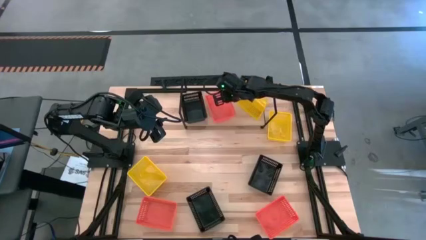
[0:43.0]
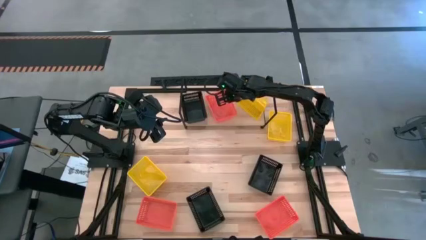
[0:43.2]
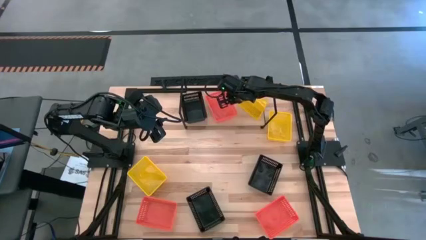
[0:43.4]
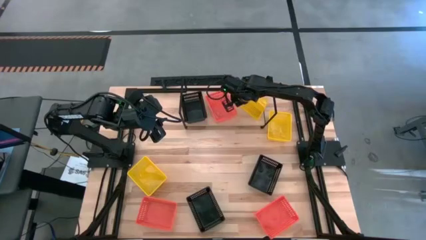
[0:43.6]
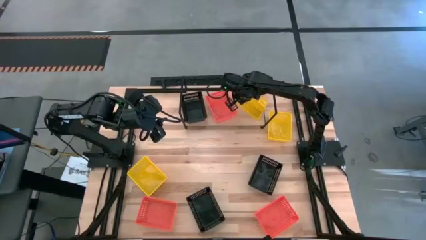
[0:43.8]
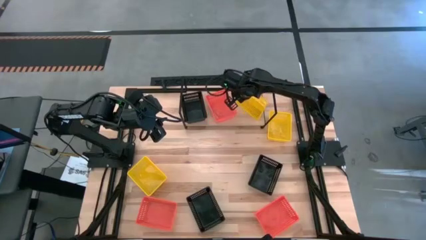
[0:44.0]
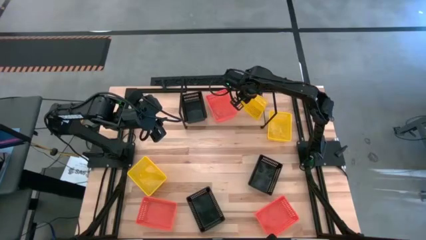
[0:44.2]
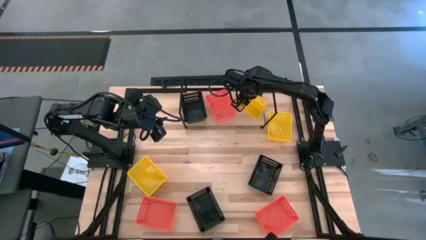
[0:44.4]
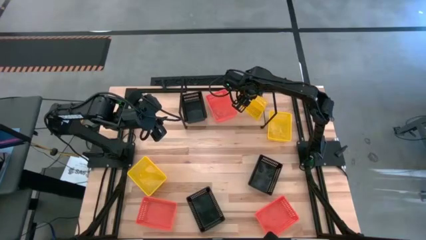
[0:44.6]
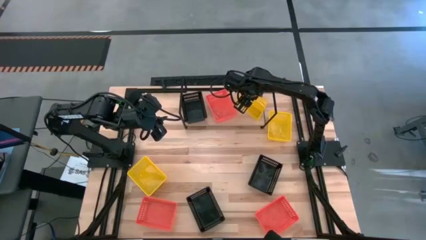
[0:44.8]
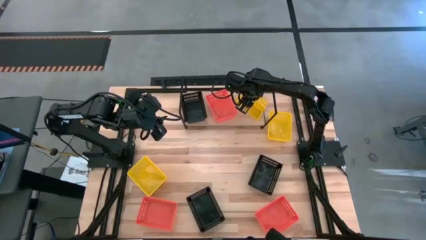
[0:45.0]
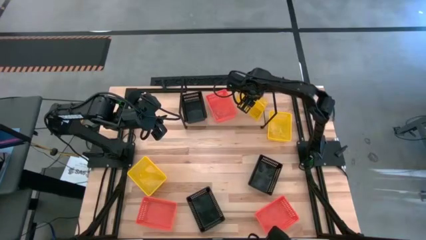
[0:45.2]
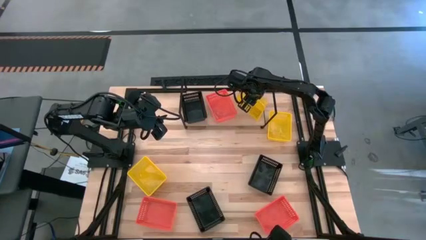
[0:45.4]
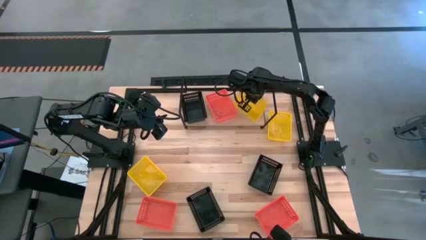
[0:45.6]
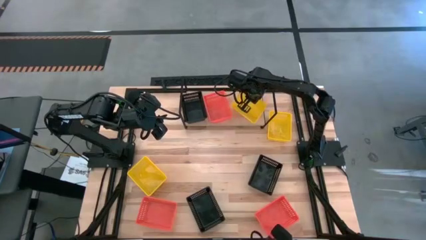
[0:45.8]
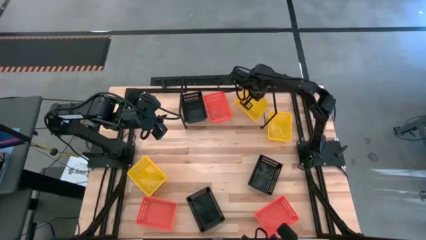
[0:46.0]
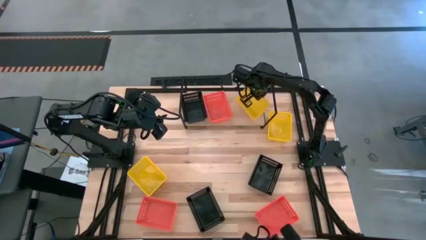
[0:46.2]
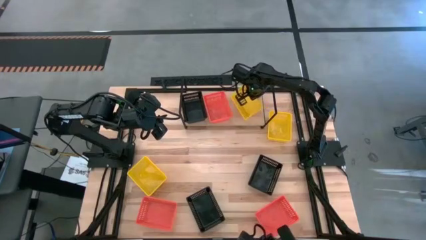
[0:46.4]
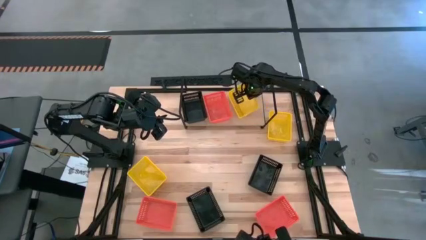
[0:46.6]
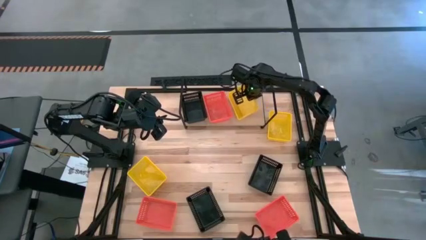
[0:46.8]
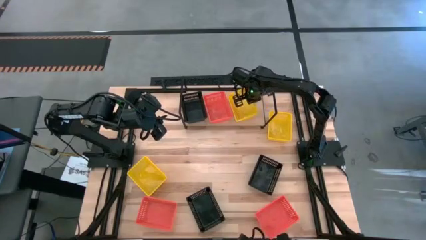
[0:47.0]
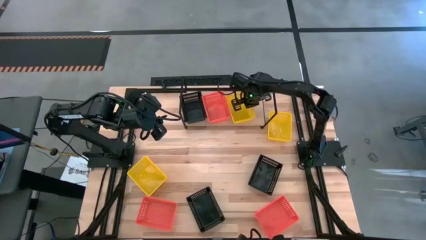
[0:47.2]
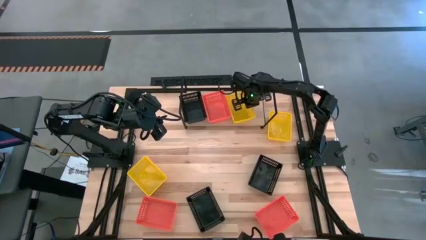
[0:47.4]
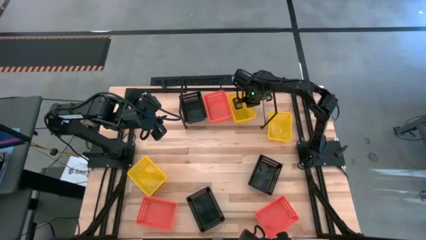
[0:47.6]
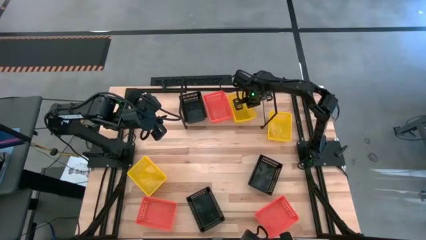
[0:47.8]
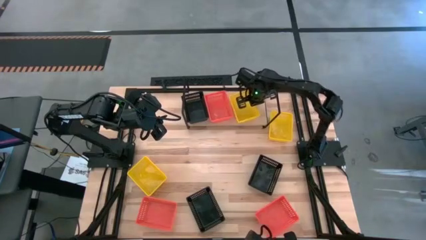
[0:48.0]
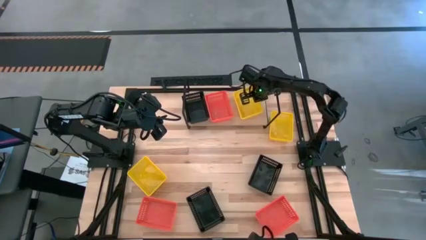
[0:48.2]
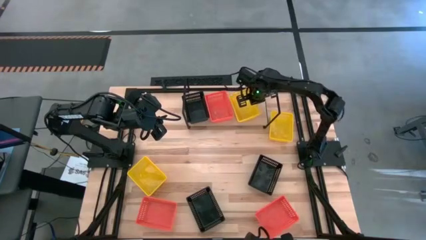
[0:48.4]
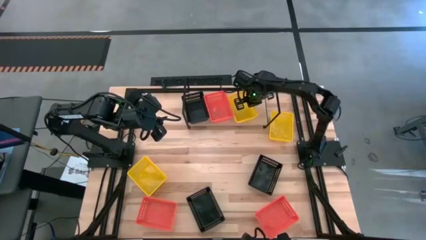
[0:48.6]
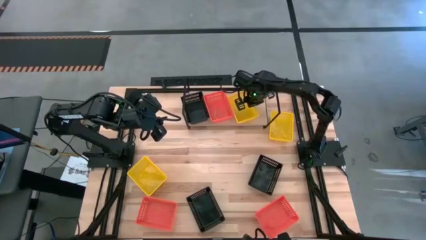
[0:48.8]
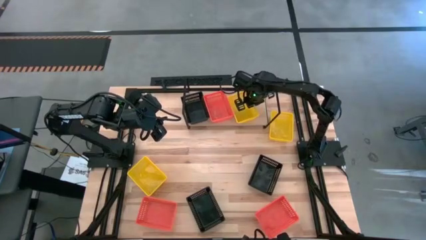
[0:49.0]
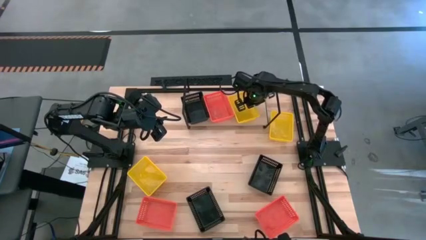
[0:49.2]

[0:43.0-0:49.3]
Task: Stack baskets on shelf by color
Adjust the yellow bin on the shelf

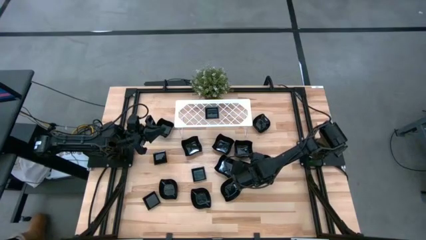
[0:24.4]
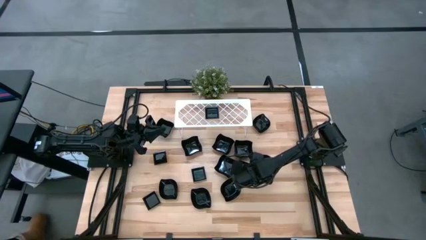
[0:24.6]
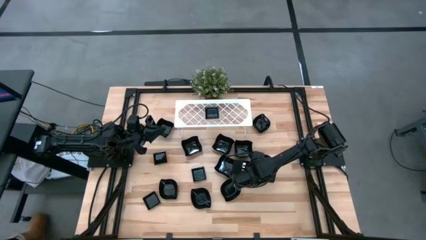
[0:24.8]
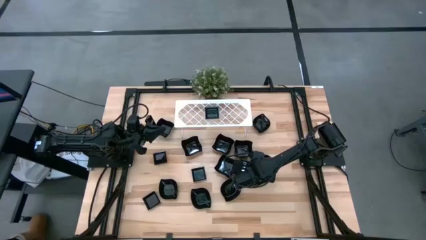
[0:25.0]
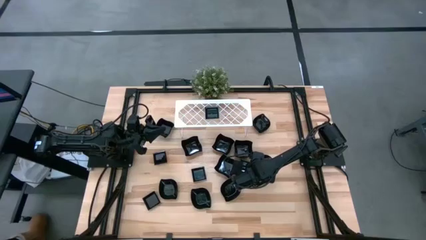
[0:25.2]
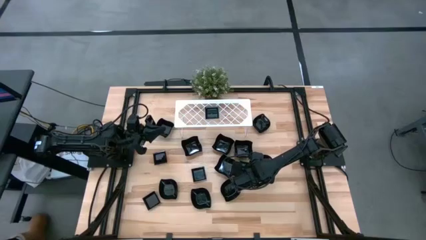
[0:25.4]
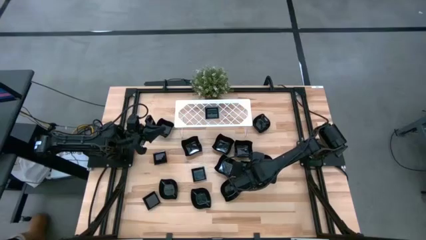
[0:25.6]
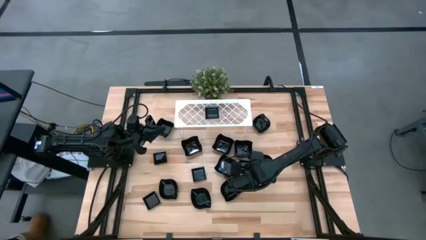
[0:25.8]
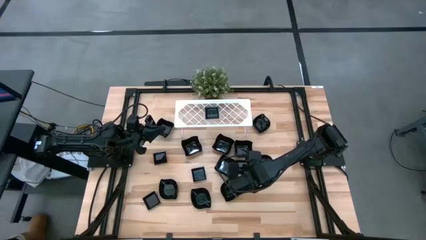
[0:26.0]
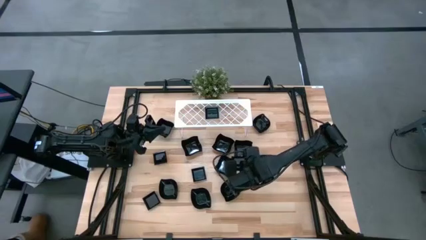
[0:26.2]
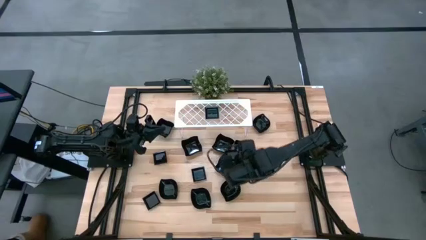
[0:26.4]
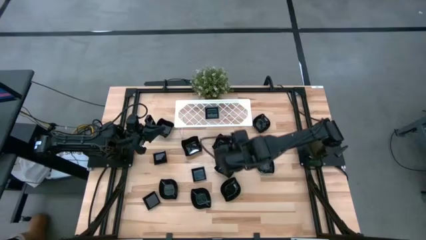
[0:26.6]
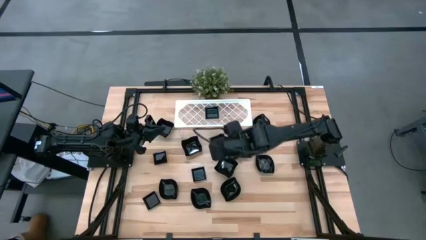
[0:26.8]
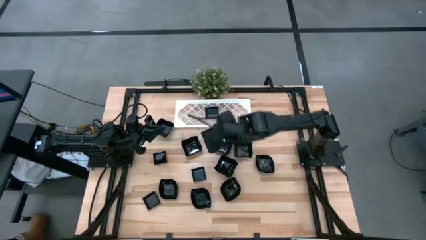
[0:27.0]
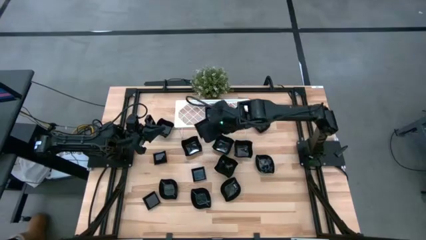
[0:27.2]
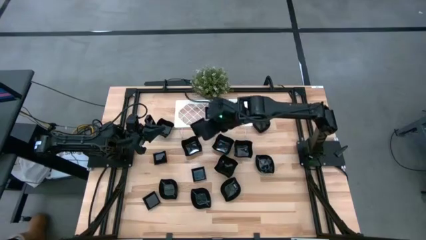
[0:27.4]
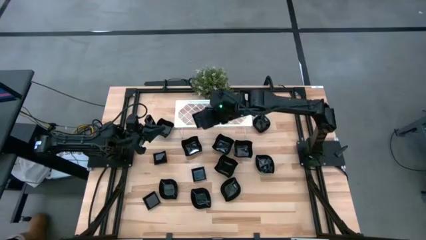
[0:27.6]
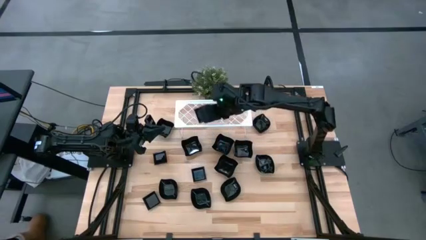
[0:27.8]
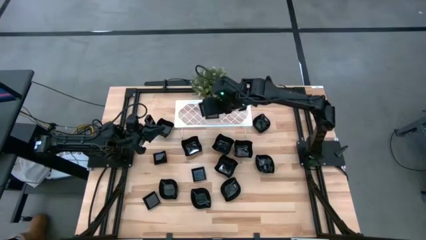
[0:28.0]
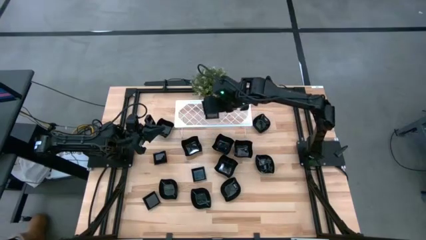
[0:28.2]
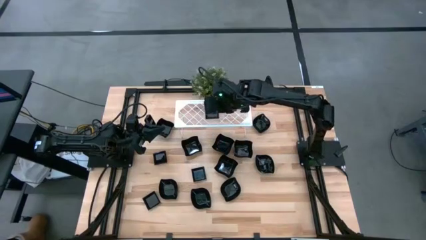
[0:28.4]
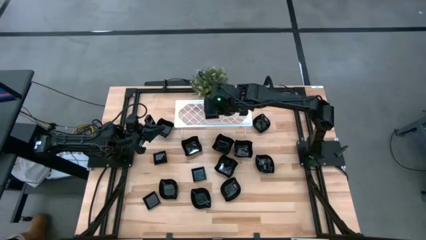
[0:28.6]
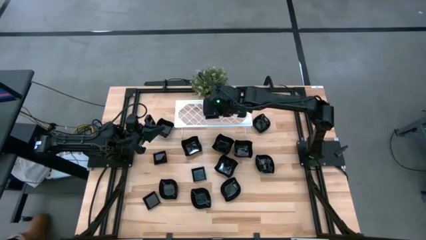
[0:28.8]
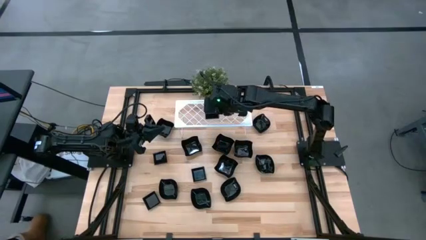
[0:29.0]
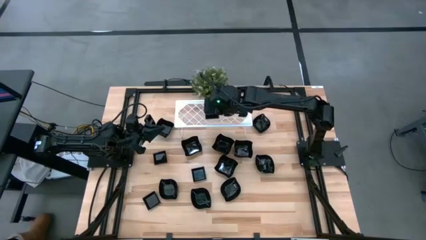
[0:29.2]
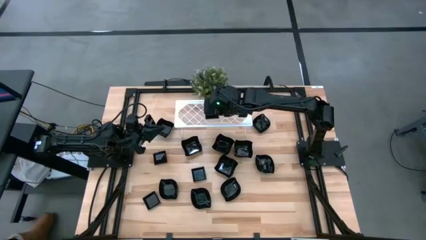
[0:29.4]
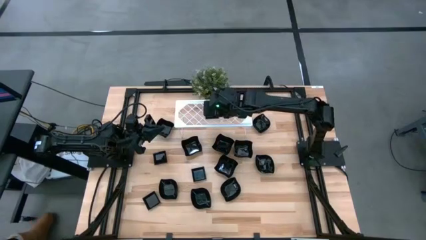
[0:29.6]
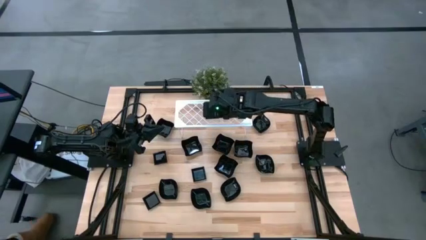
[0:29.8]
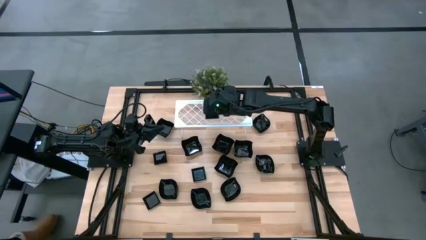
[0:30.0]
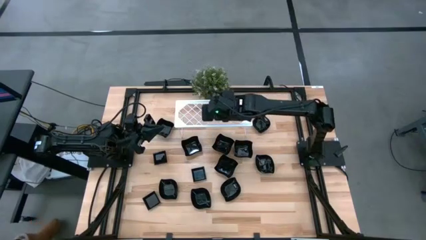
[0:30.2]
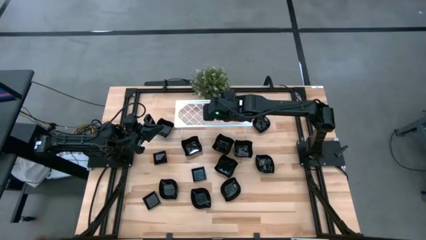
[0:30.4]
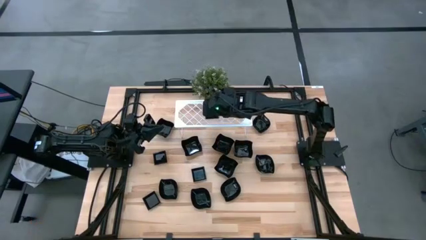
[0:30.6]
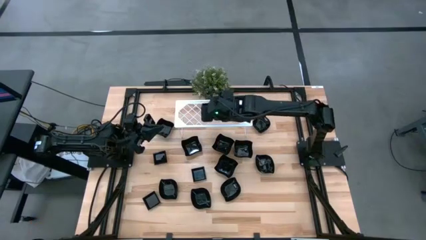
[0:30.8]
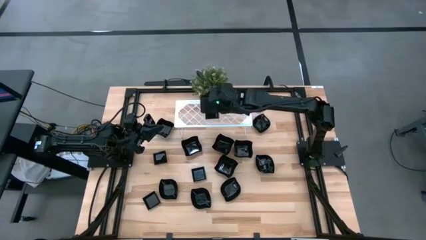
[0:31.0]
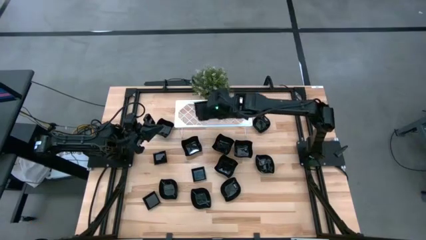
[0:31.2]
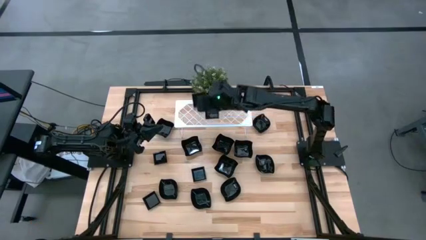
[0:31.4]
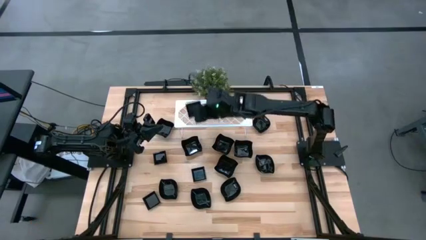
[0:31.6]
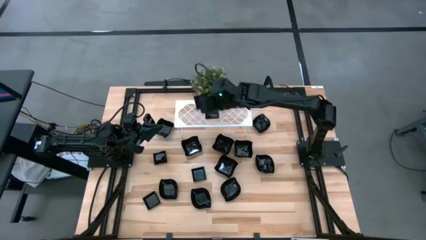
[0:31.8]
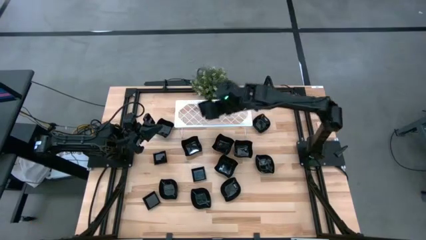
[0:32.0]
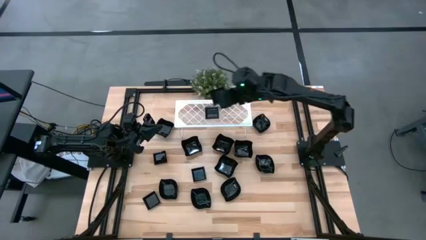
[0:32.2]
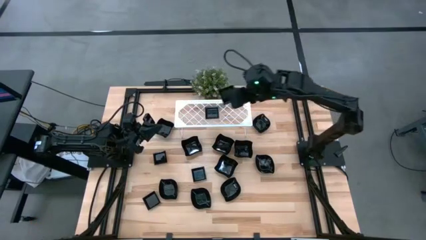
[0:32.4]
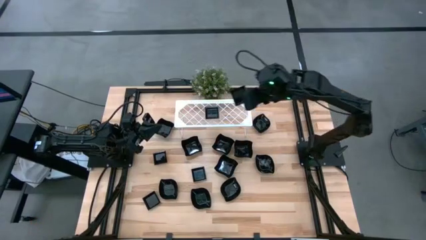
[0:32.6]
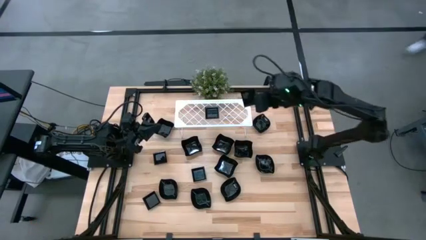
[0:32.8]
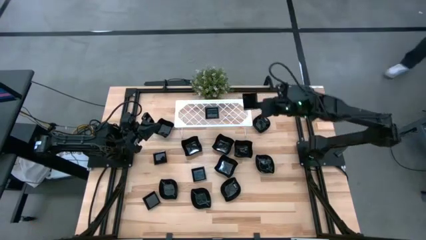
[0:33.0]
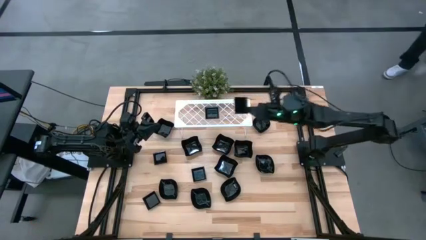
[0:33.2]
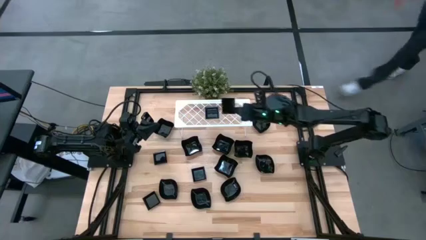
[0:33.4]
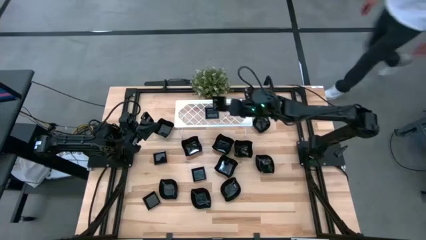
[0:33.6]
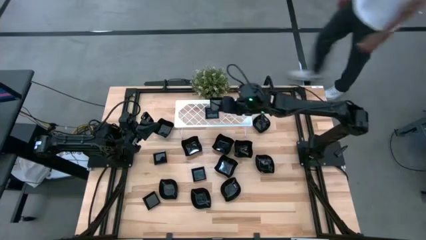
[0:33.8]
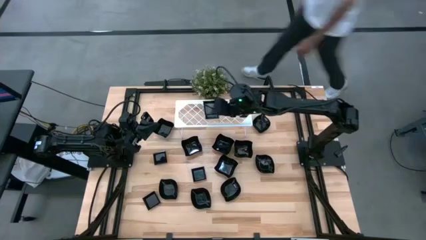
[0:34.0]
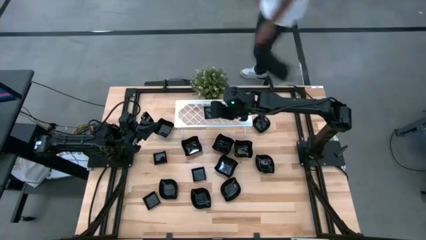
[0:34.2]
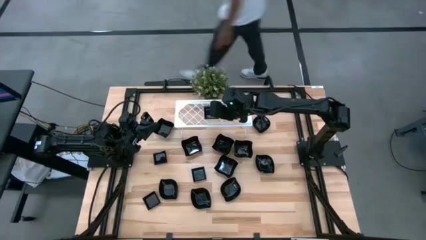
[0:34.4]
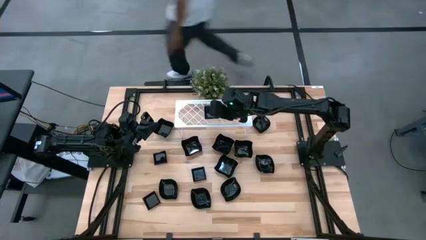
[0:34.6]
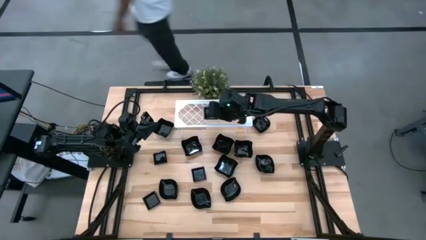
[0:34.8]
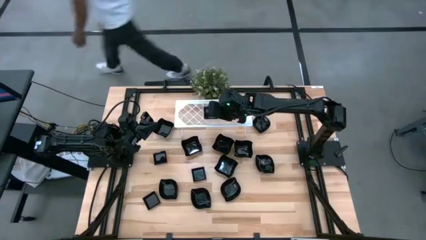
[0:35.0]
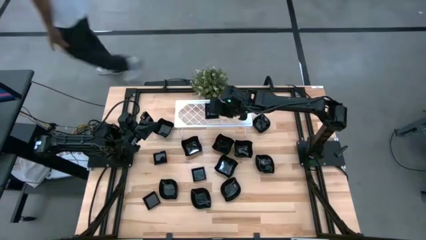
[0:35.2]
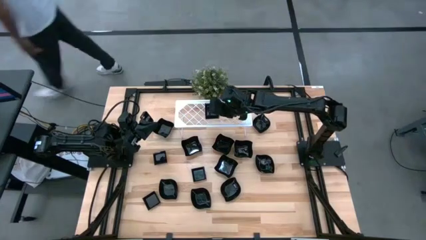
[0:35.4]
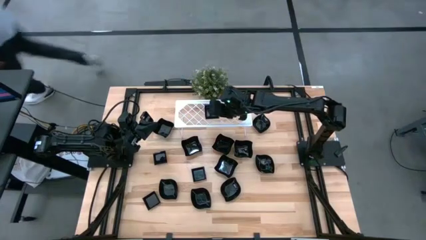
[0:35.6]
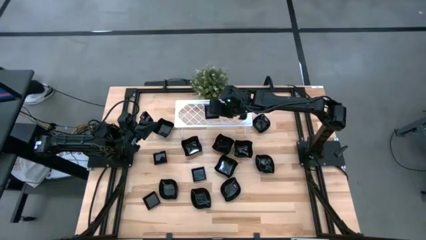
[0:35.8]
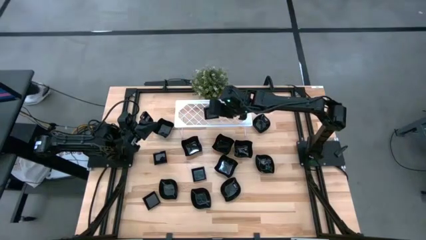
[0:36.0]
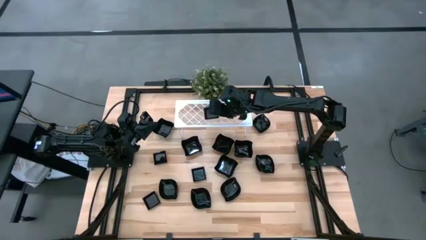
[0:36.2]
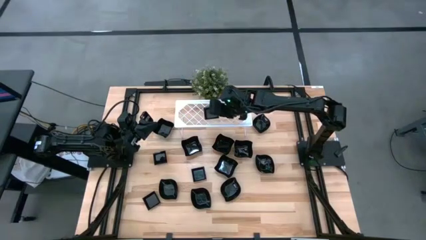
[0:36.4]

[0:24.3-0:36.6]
Task: Pick & Place Mini shaped plates
Stack the square plate on top of the square plate on the shelf
